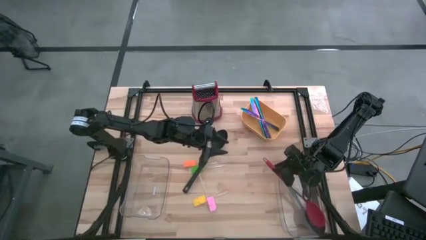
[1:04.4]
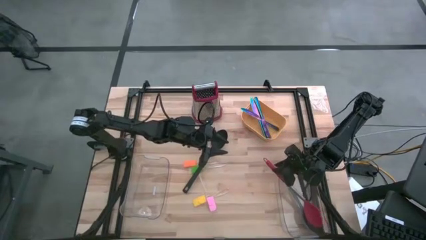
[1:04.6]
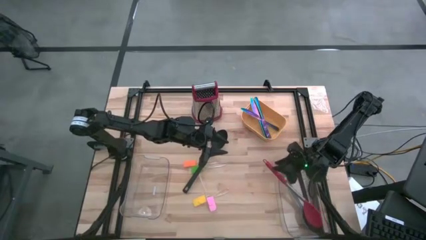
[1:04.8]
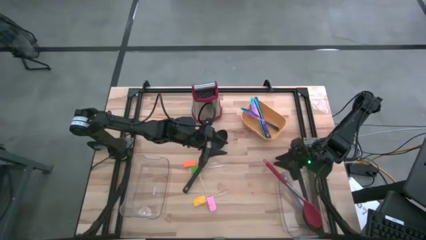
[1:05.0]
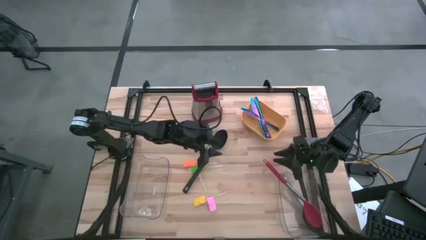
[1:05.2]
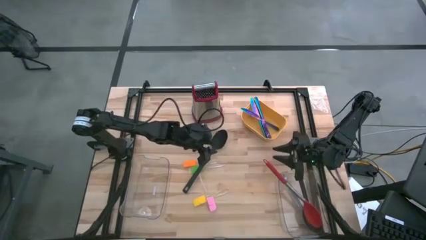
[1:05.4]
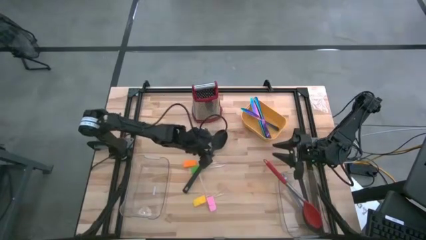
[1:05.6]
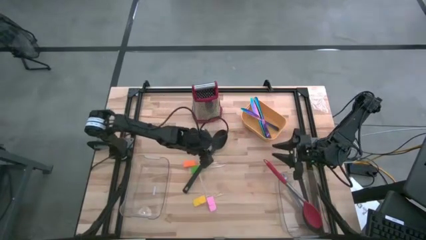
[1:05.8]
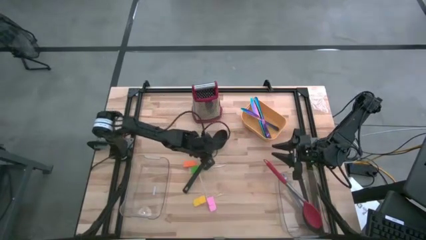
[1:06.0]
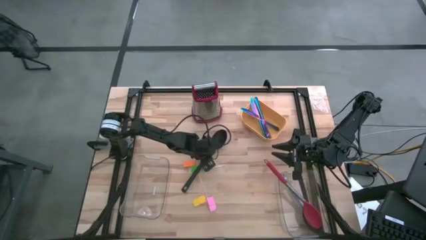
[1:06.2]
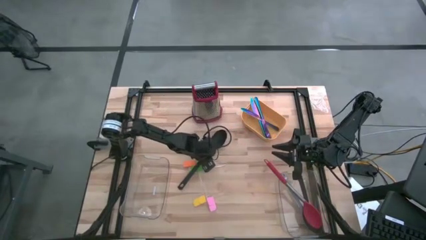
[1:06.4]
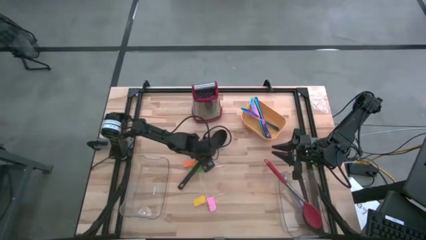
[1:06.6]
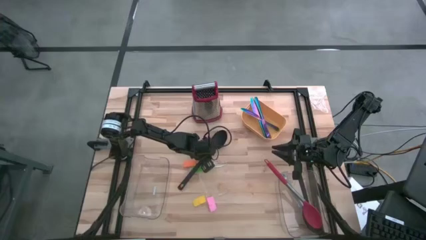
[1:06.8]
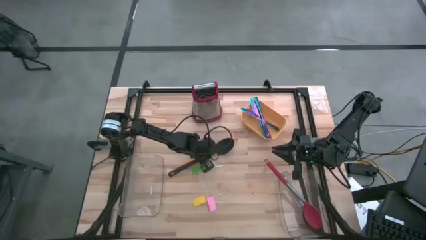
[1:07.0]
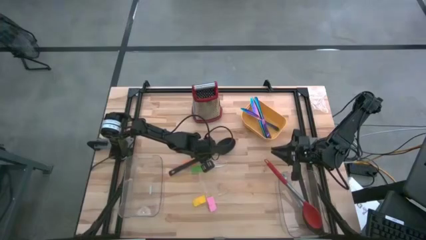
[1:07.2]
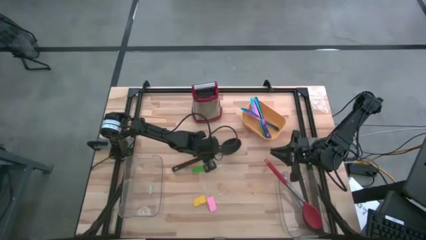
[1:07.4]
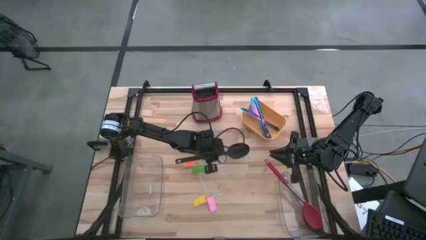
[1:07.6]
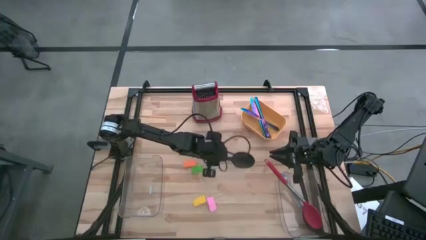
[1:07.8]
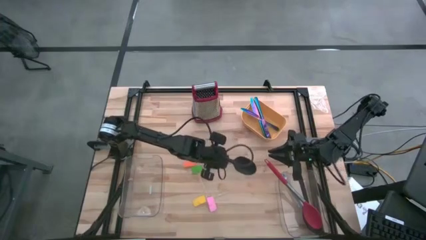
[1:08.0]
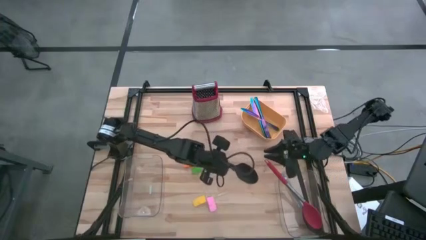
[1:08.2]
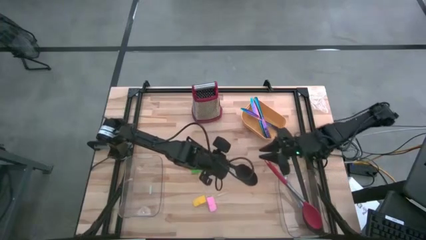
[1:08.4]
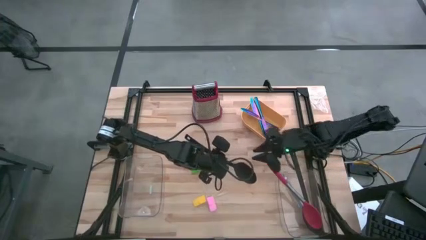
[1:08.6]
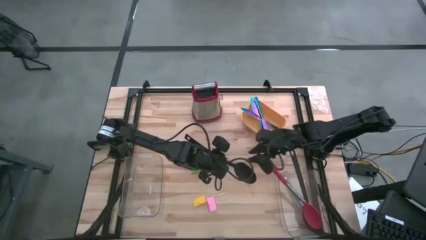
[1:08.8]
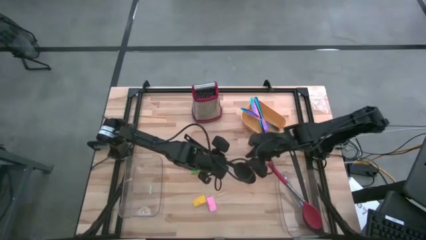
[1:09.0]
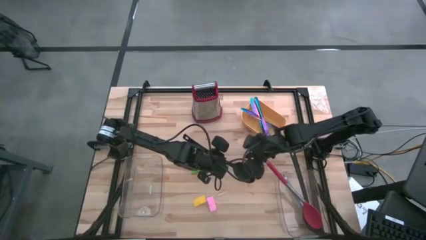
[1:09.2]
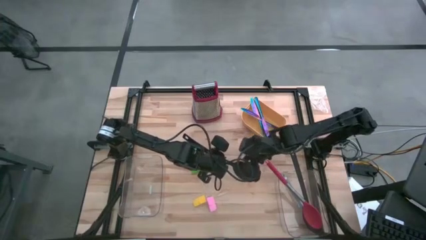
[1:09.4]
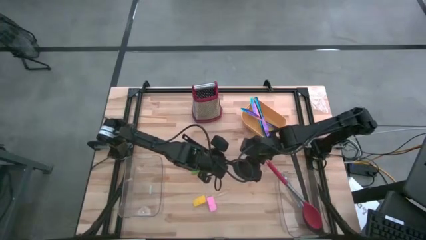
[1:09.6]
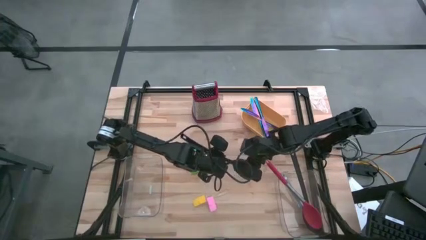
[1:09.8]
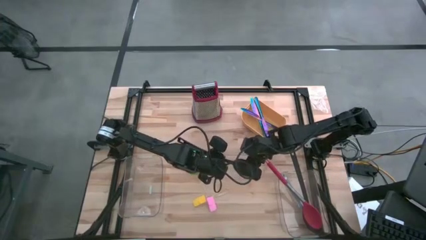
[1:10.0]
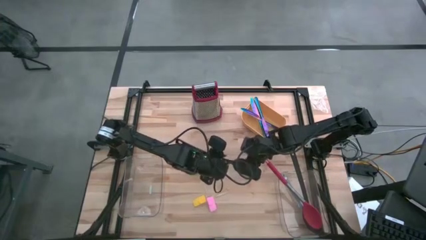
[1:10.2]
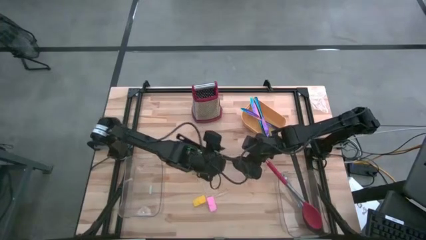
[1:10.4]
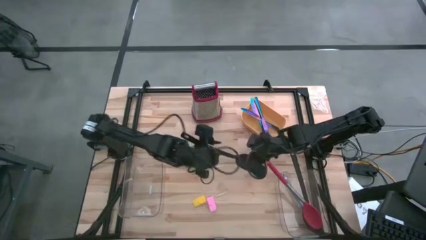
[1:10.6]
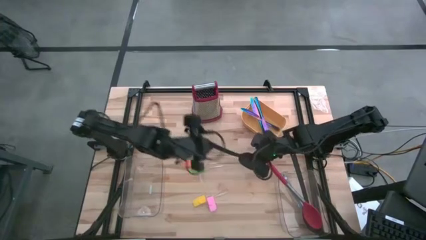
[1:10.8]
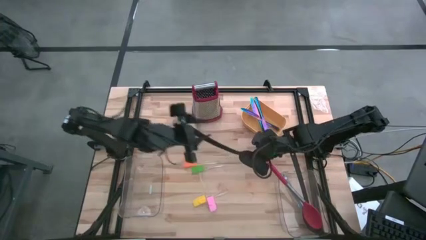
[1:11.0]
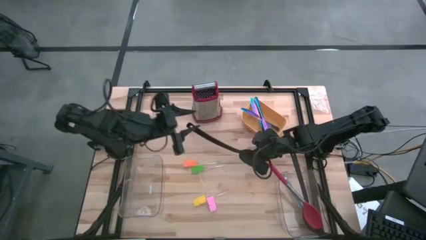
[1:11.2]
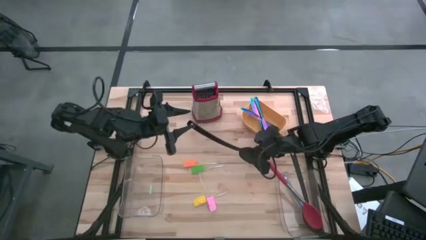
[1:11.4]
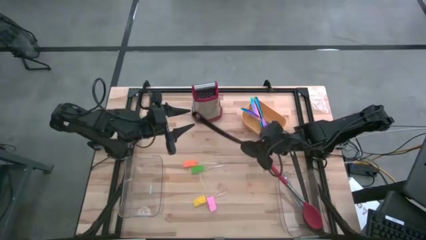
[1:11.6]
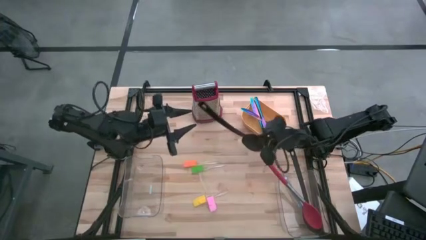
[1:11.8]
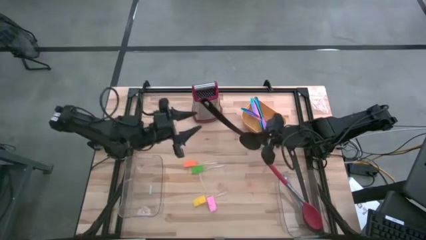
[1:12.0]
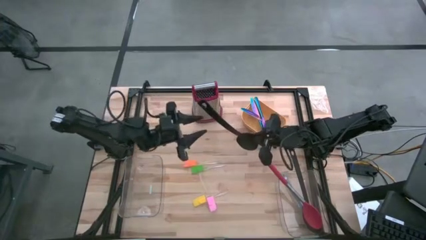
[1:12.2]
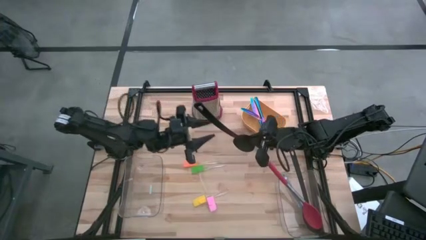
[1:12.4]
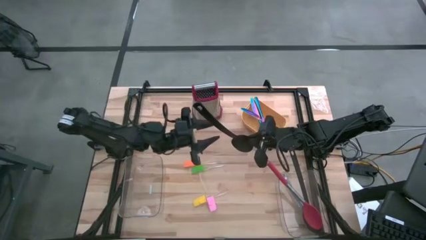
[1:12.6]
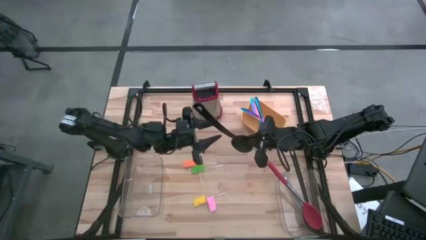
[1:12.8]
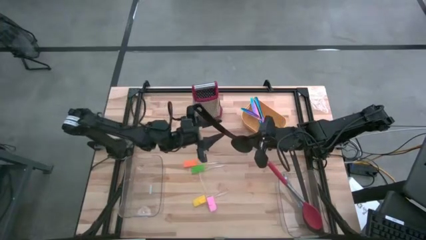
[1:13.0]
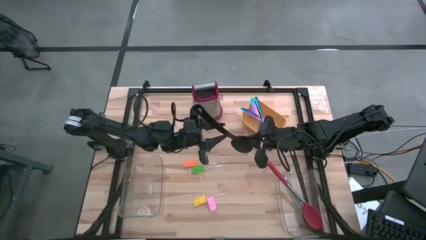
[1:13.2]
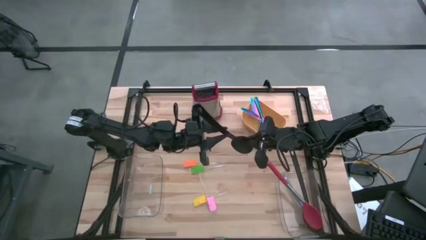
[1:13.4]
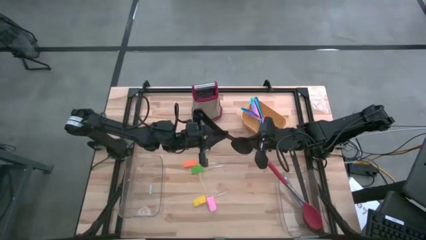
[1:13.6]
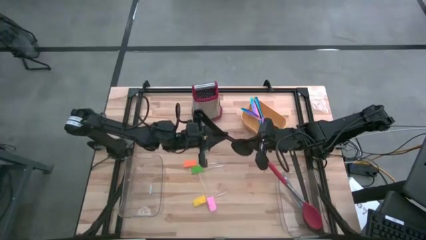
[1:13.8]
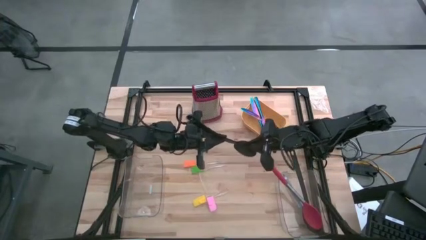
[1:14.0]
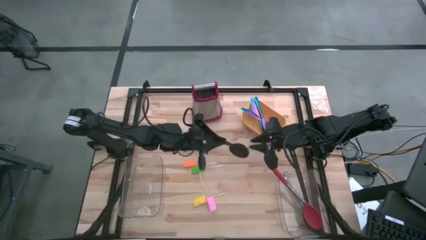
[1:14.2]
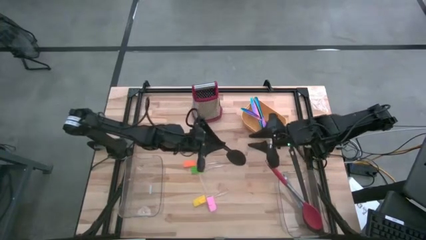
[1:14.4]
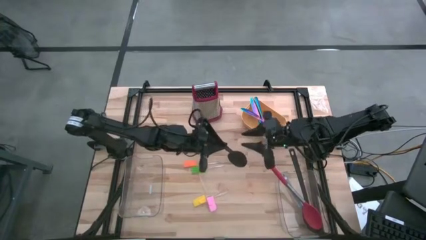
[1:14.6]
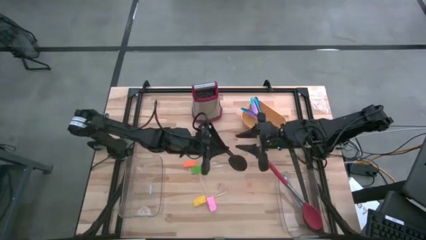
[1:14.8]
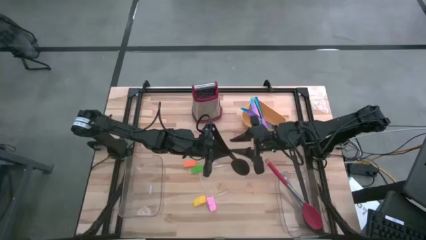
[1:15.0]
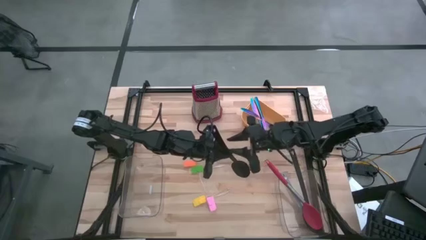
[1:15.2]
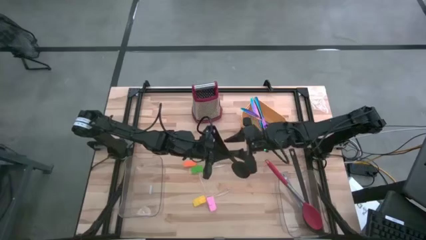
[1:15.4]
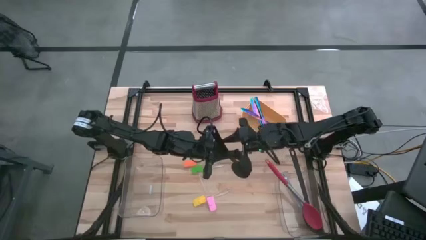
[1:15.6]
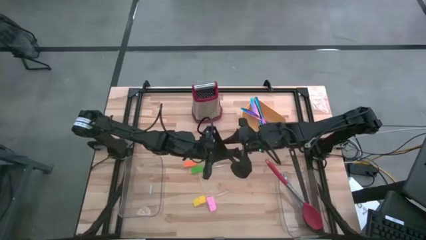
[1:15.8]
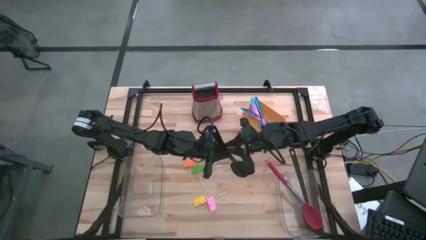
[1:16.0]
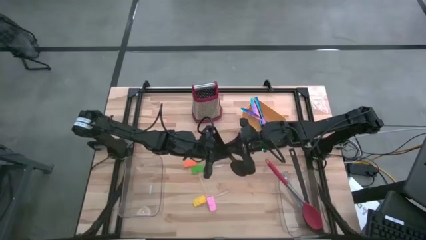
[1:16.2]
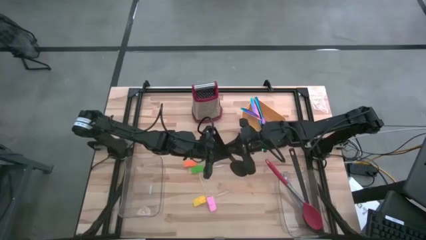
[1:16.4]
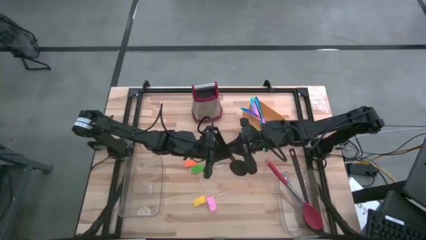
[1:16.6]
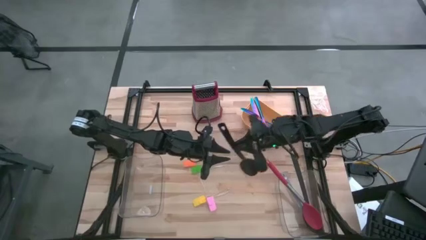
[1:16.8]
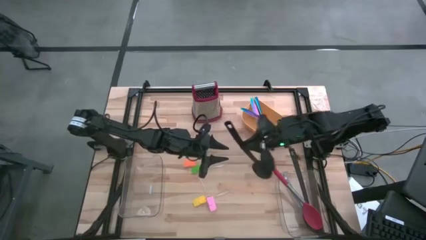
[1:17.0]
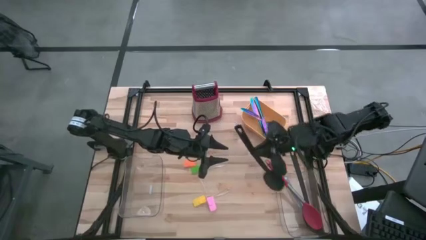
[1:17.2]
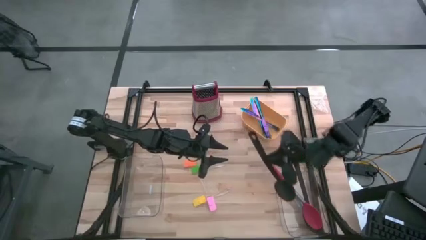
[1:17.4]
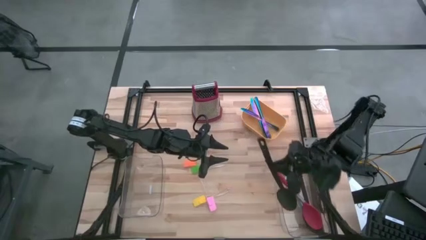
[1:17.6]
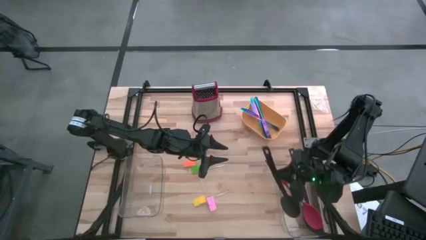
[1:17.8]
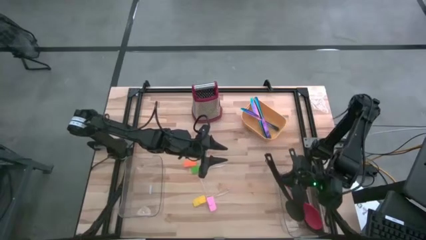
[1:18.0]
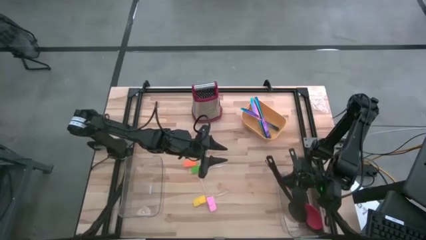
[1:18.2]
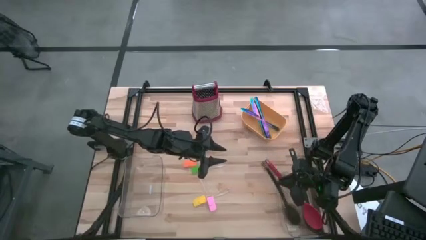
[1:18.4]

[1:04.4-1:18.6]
Task: Pick & Place Kitchen Items
Put the black slotted spoon into the right transparent bin

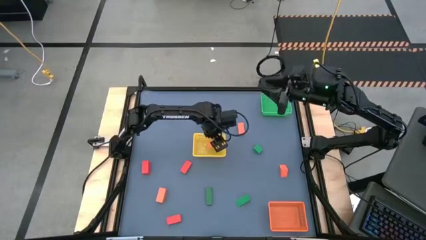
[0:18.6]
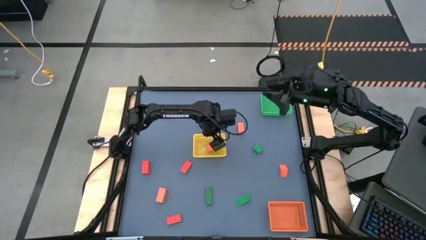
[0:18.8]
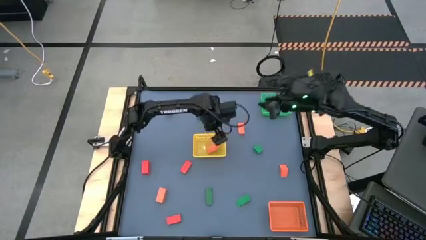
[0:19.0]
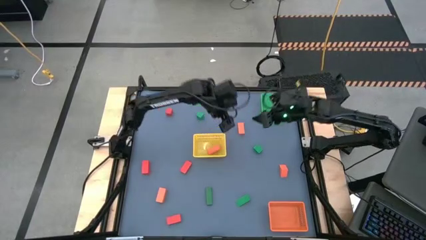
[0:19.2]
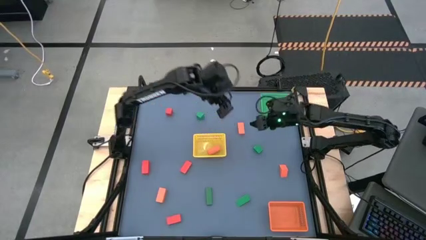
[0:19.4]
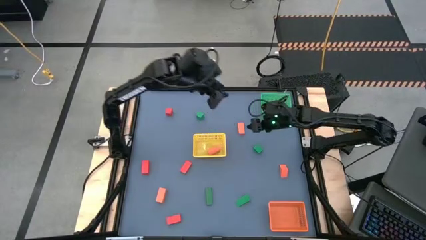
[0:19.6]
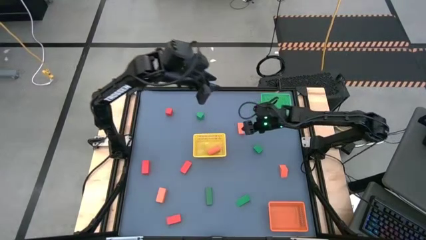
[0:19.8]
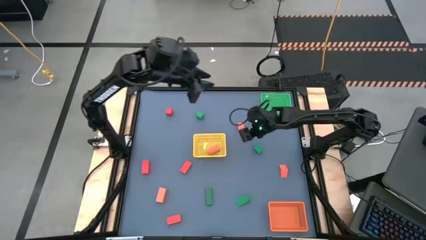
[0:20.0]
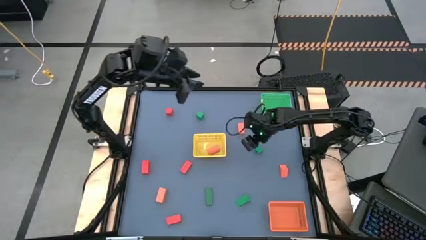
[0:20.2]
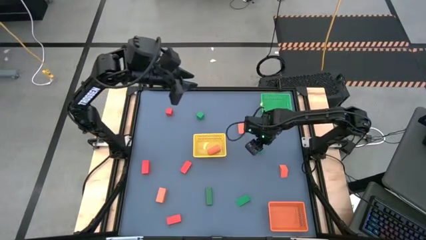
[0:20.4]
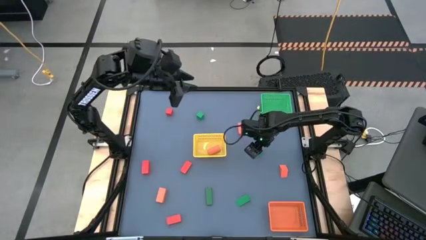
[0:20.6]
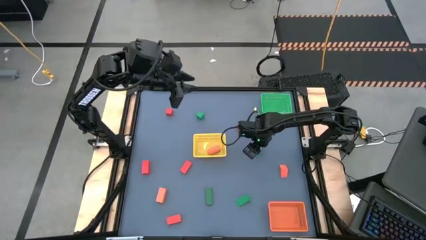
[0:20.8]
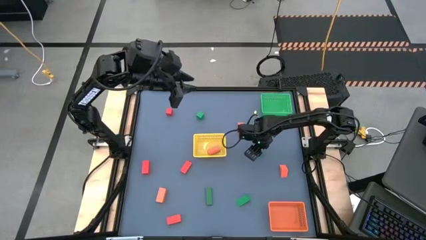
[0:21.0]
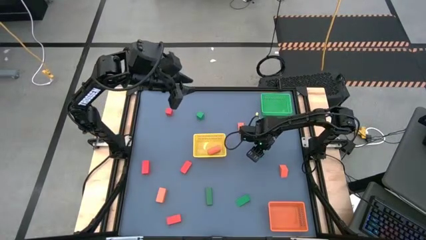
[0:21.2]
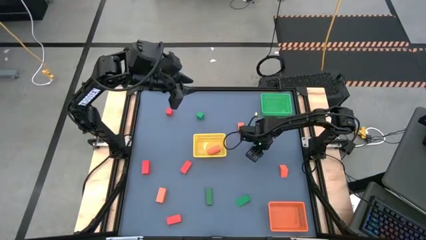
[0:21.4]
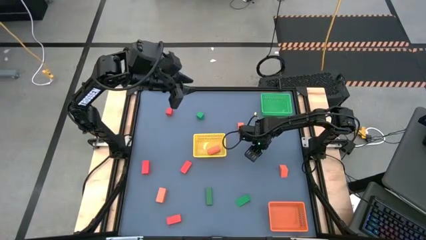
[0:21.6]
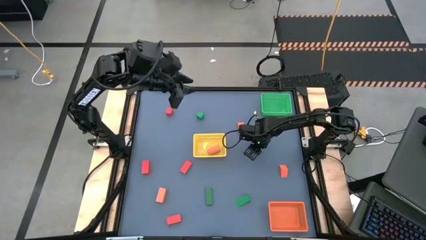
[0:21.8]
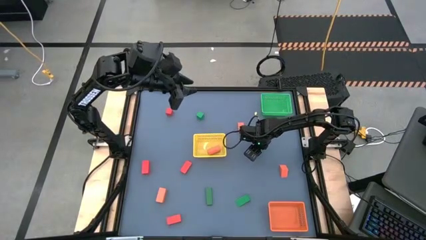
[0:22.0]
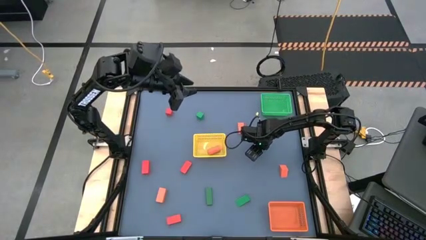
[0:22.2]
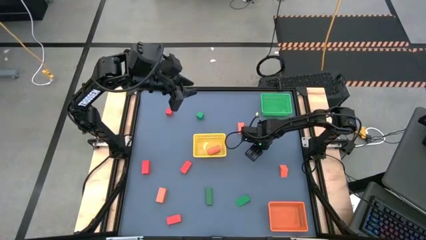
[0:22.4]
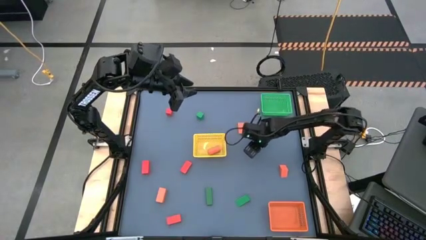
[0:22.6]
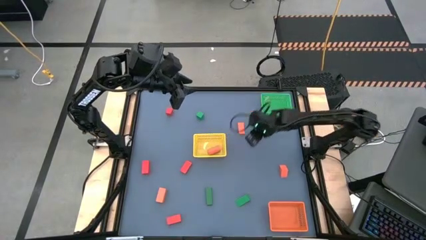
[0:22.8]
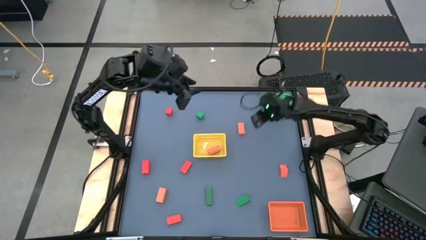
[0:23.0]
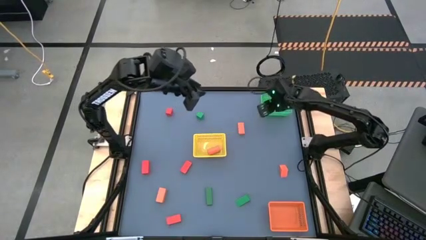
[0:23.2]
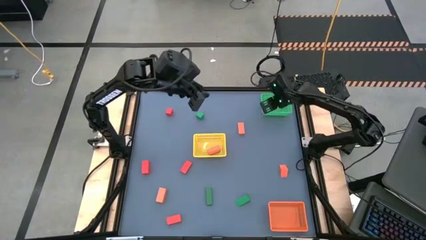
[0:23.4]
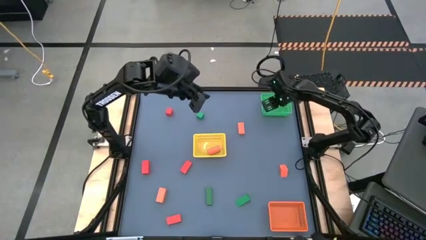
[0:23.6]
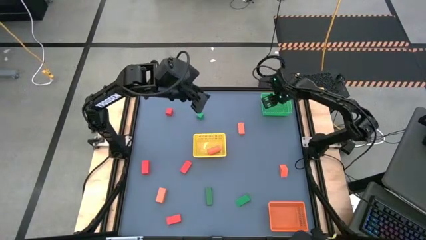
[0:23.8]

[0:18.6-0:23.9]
Task: Sort & place blocks by color
Put the green block into the green basket
